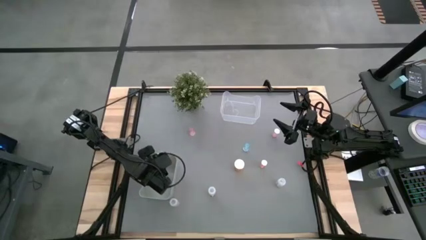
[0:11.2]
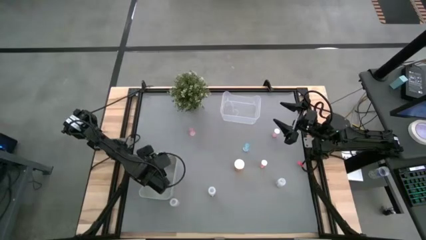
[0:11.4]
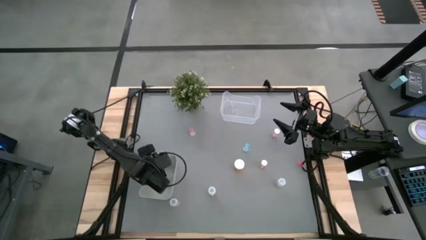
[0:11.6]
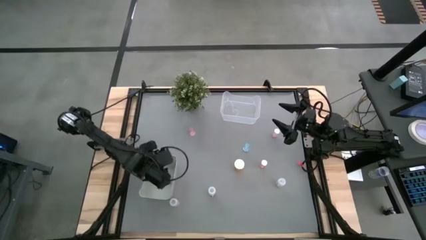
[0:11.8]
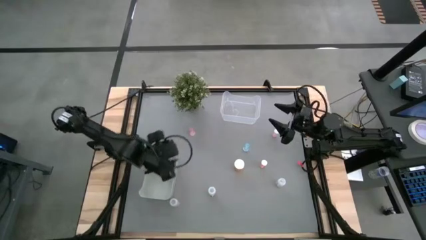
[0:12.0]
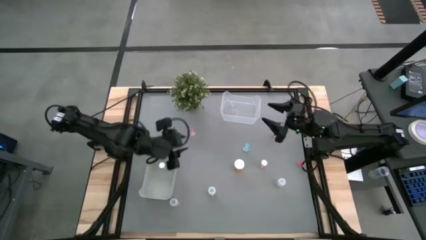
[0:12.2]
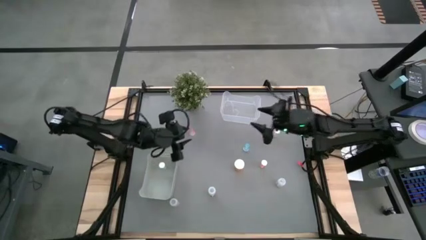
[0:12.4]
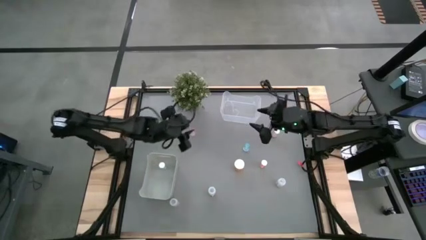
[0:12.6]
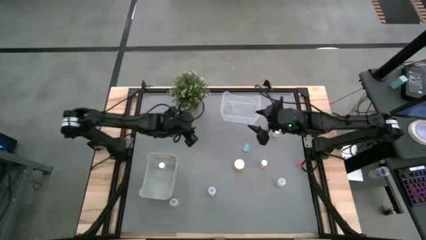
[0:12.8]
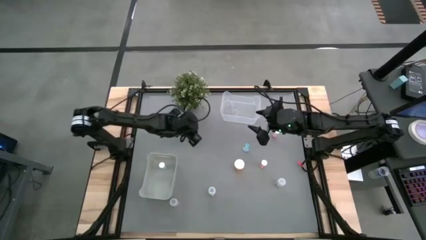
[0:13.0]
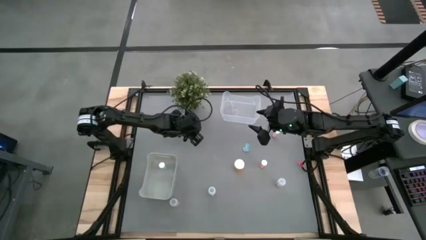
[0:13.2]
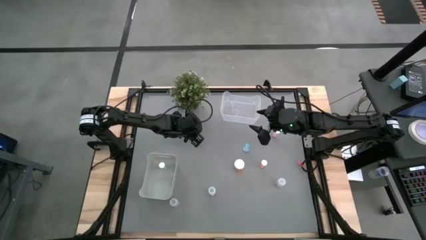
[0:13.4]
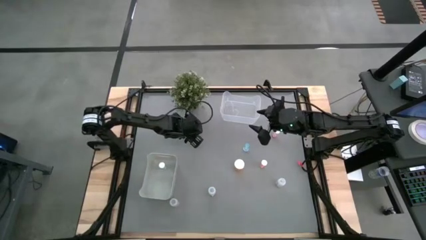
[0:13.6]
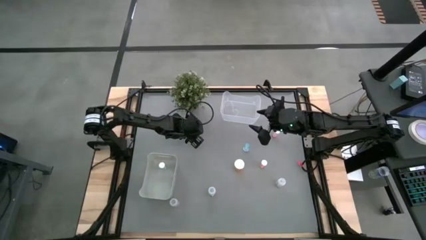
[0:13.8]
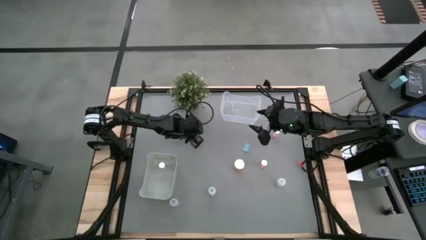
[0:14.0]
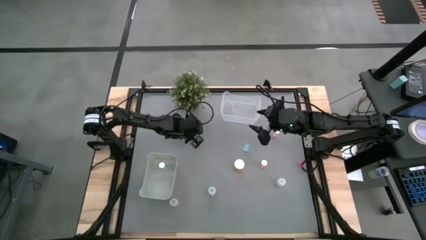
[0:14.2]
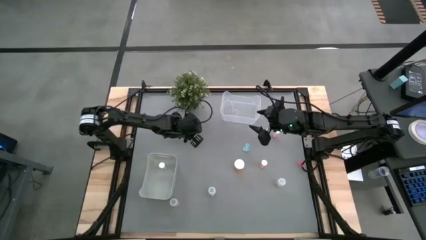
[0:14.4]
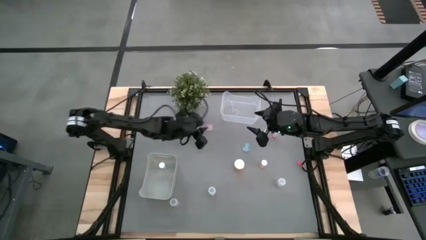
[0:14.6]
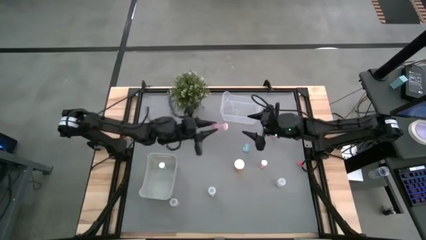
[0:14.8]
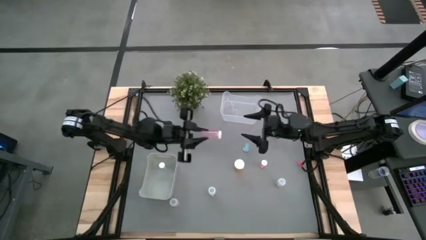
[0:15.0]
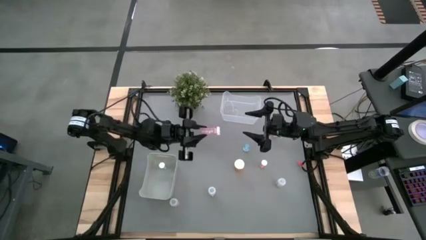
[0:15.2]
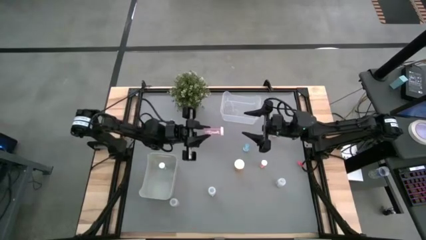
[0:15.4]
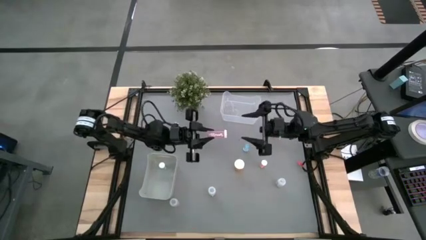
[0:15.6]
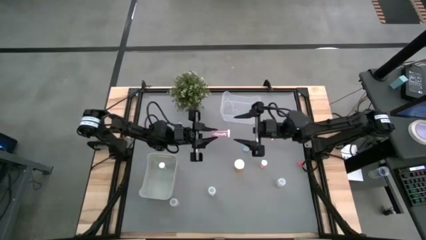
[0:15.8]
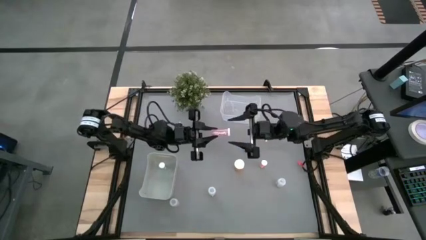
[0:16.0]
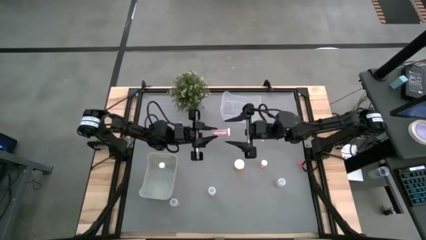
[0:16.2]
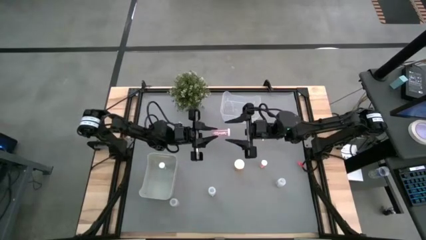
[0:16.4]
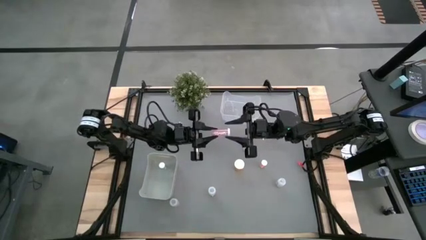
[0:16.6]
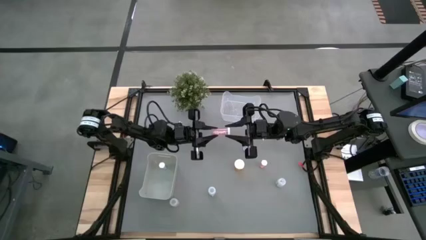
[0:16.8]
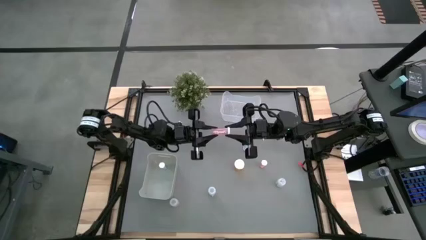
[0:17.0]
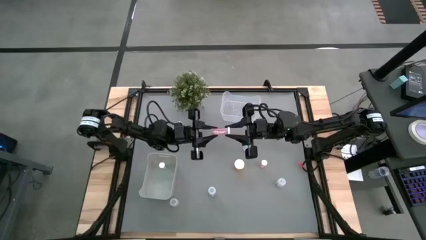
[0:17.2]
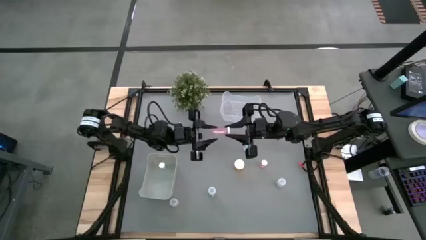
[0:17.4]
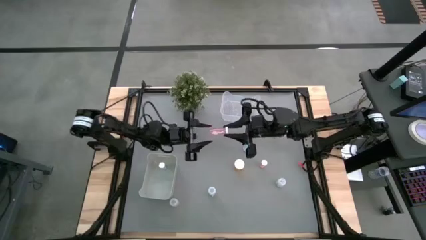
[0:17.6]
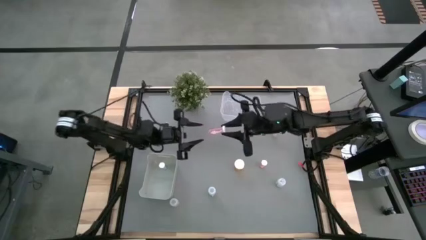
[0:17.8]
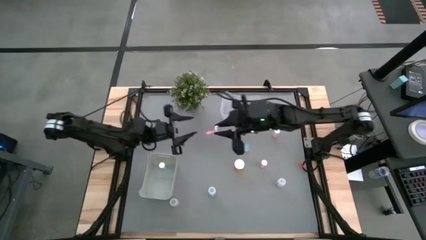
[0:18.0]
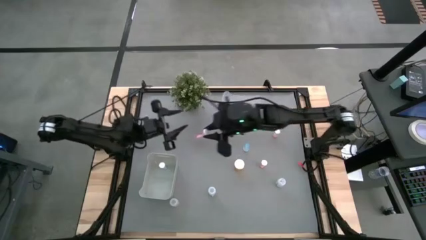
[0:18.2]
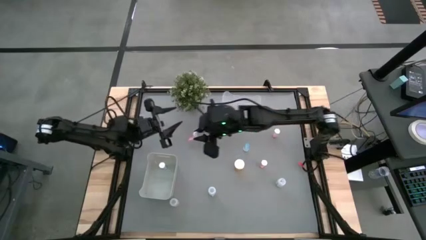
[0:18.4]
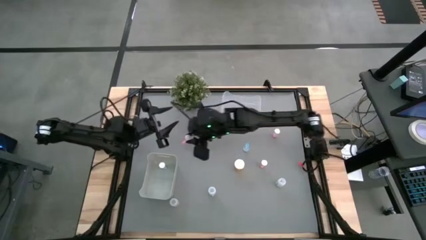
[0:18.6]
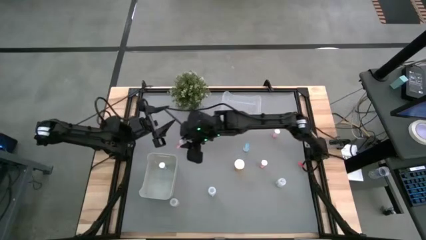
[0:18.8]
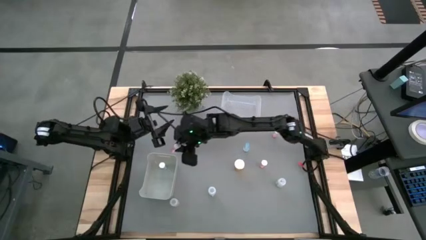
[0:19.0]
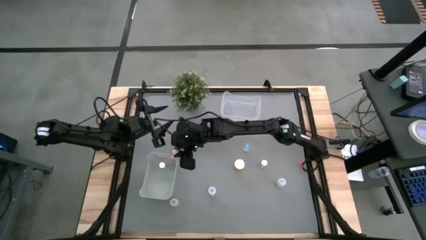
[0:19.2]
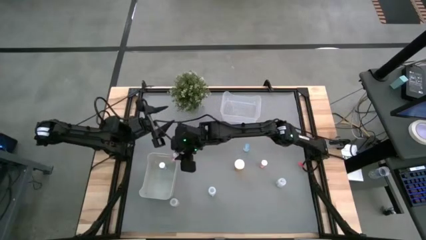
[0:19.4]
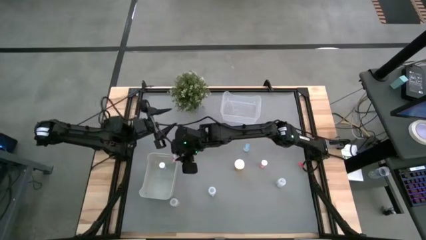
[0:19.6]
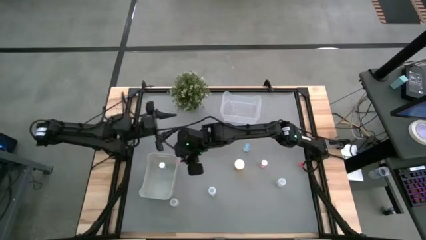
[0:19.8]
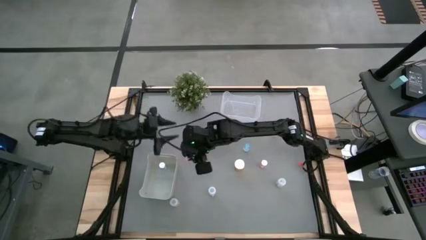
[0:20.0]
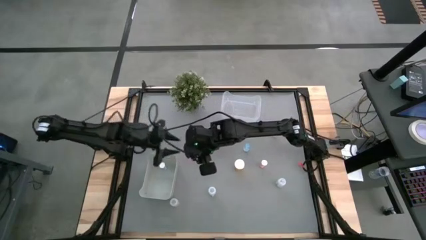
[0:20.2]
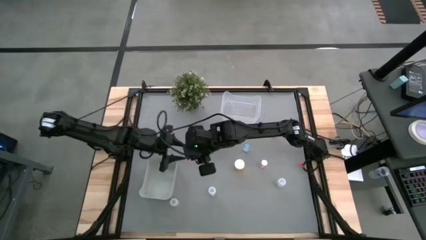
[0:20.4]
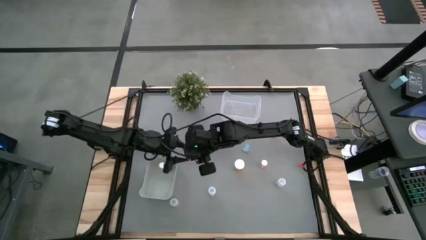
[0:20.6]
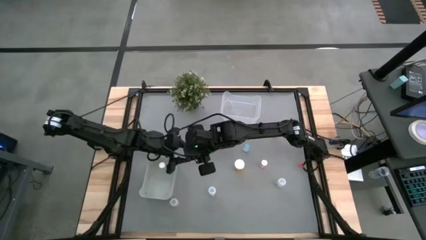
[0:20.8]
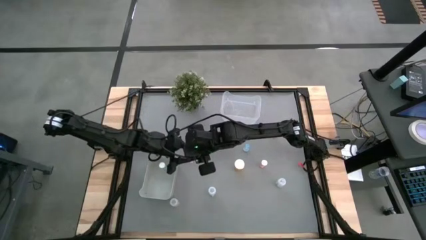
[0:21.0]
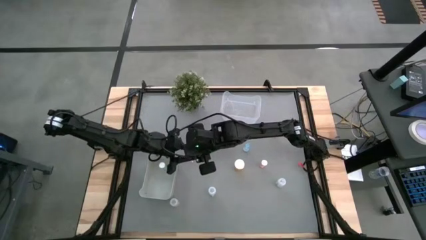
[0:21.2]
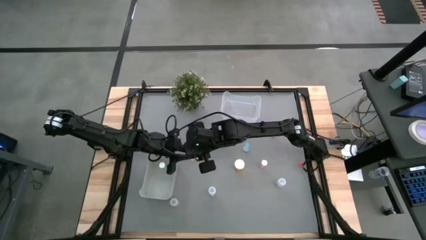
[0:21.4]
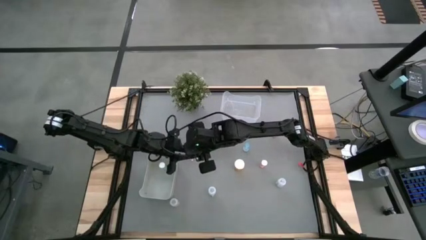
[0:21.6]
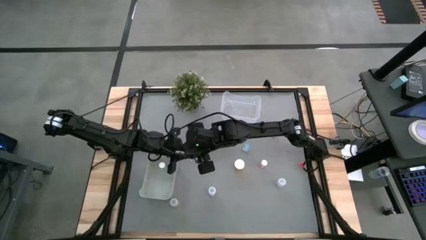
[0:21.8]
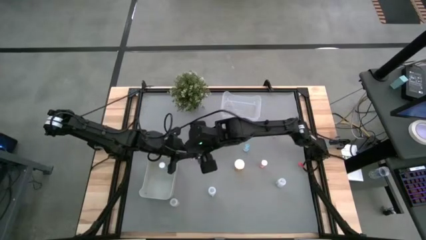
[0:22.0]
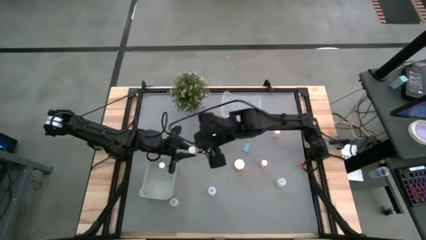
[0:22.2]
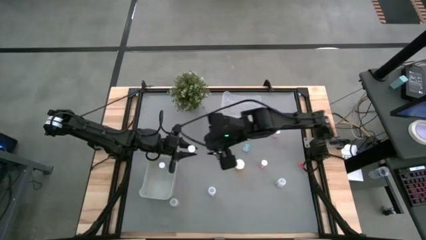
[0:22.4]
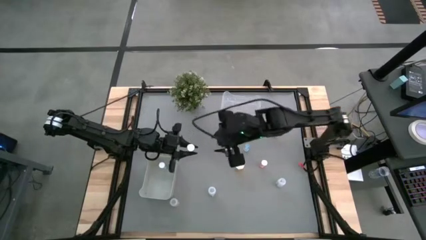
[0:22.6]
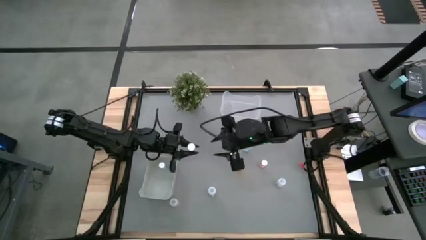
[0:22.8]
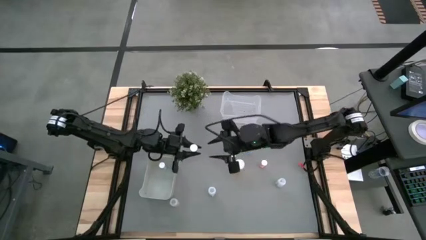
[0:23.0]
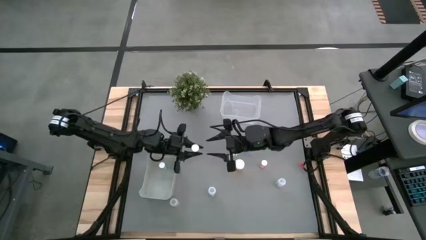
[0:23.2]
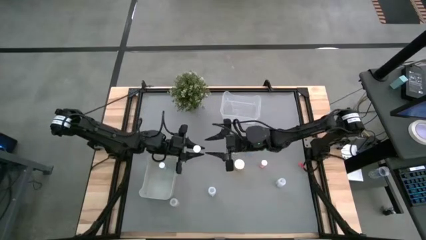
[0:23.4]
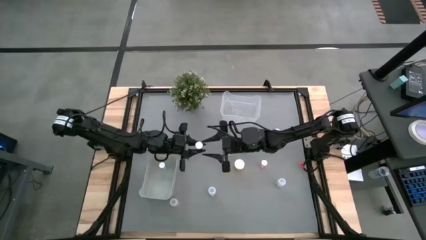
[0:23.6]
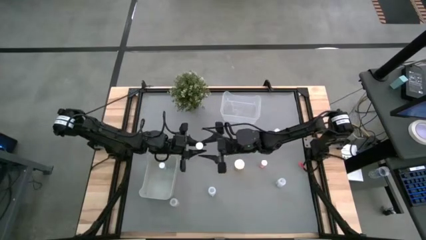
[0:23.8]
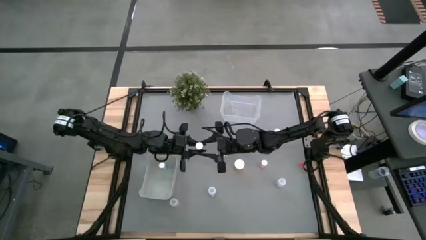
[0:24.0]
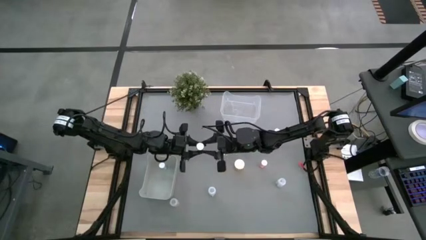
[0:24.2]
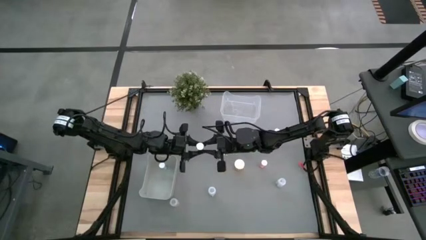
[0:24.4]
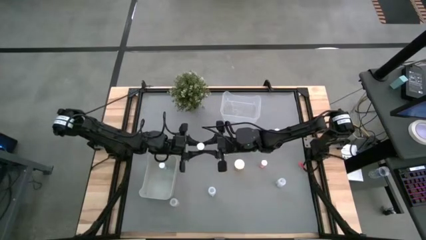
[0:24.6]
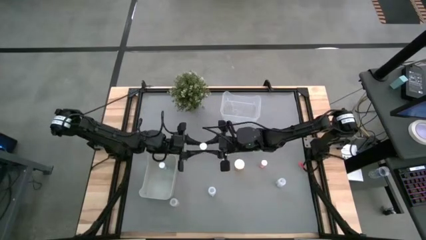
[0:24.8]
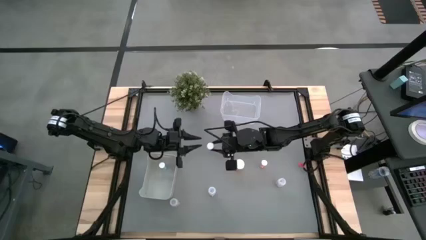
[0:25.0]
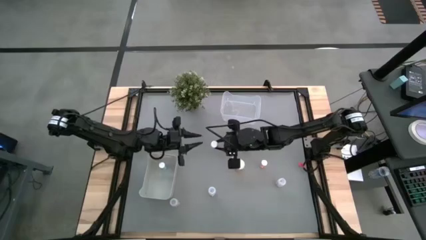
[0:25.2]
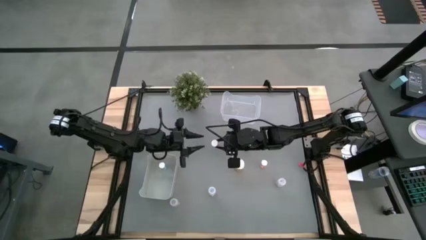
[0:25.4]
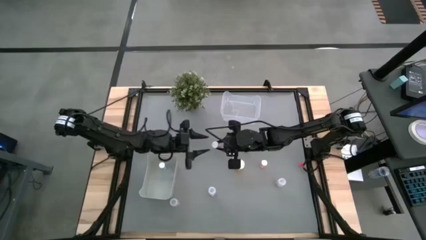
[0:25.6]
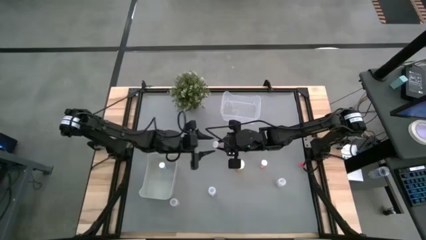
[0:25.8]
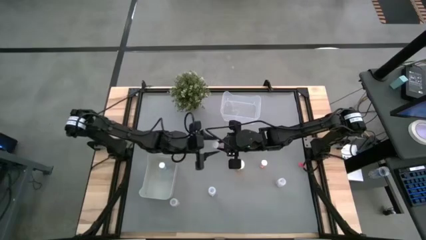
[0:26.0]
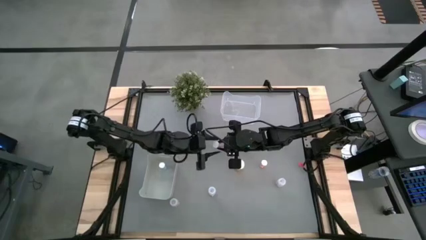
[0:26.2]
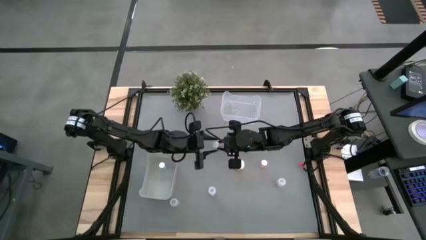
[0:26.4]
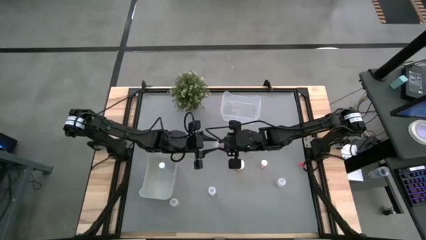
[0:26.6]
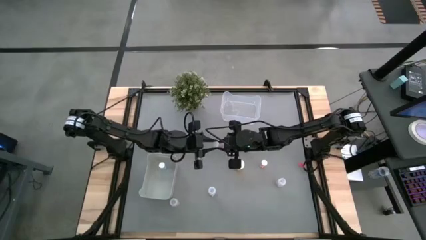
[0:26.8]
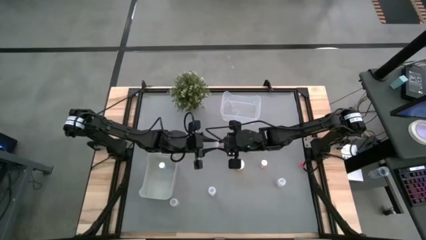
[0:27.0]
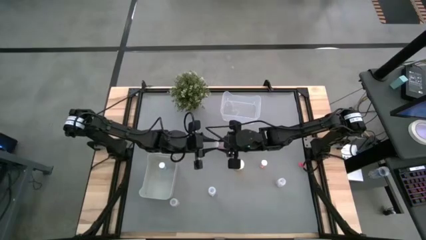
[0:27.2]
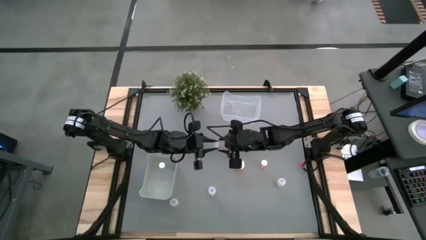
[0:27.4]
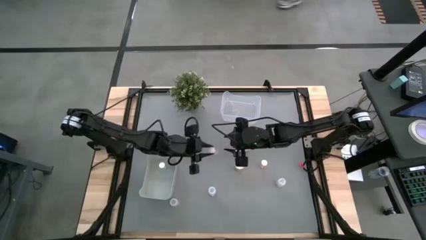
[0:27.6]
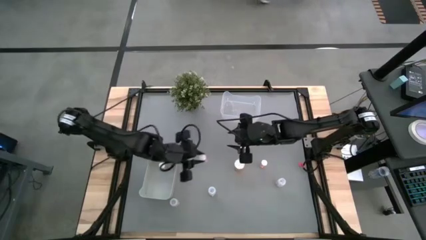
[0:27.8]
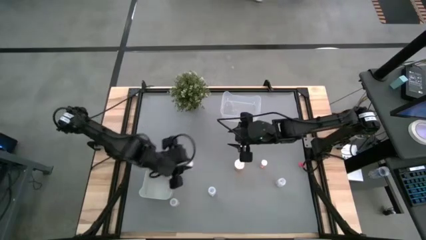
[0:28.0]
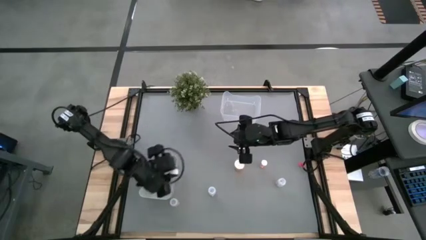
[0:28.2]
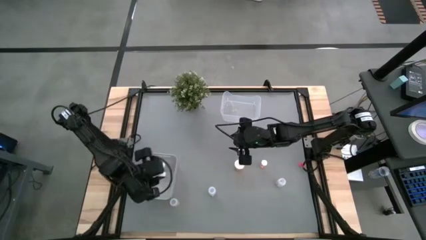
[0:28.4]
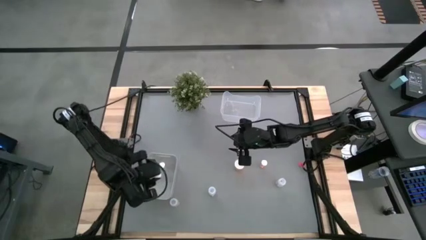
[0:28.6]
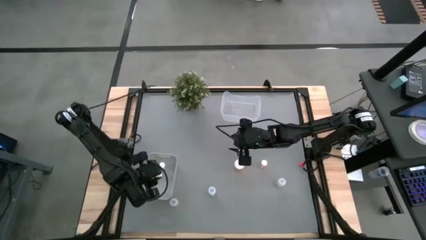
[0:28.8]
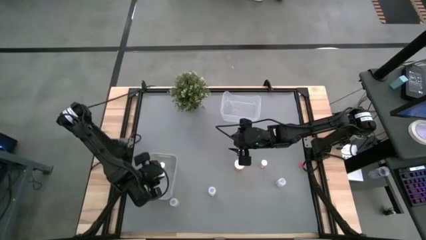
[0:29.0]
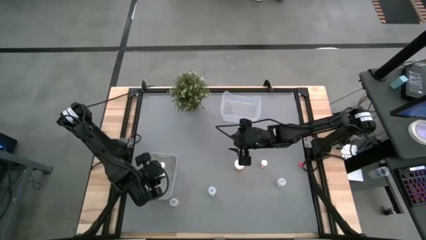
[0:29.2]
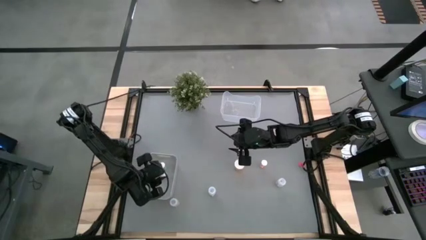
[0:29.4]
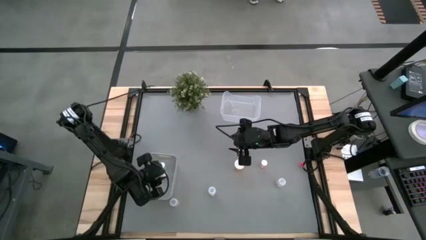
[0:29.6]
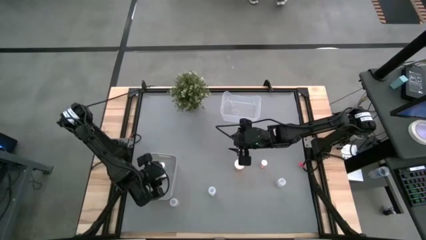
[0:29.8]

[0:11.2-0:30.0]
Task: Pick and place medicine bottles into bin by pill shape (circle, oval)
Put the top left pink tablet bottle into the gray bin
